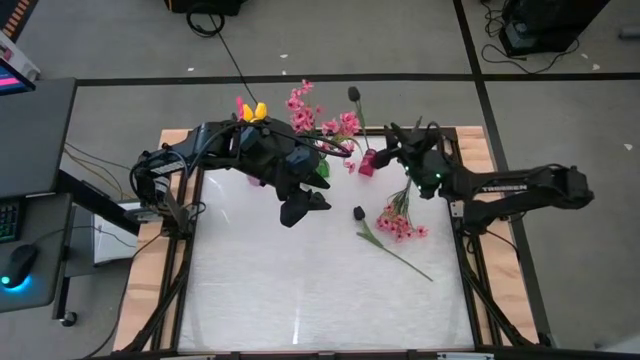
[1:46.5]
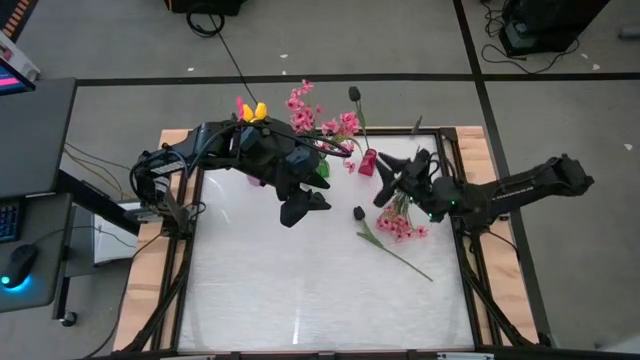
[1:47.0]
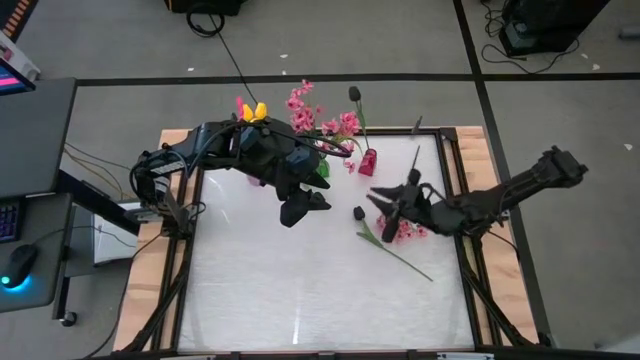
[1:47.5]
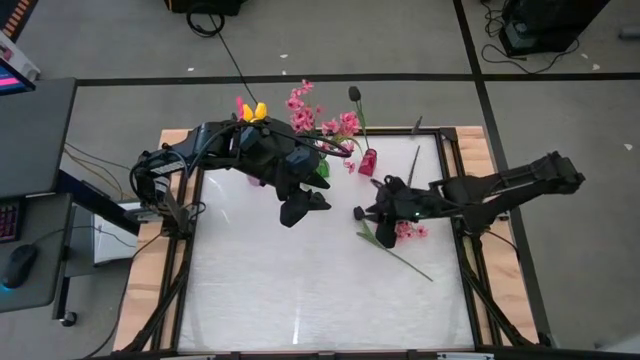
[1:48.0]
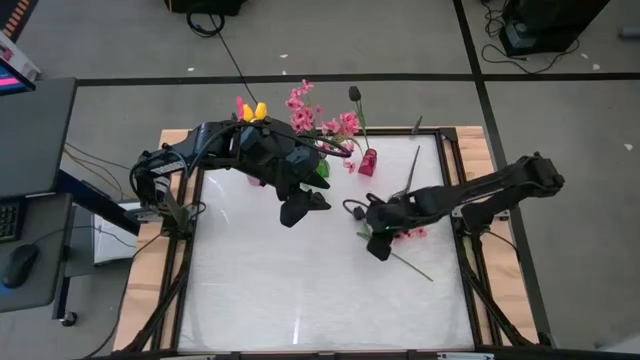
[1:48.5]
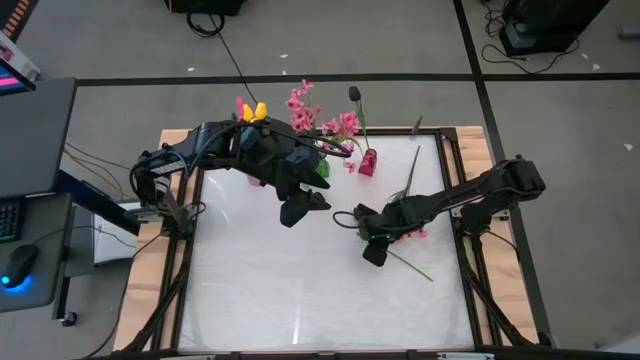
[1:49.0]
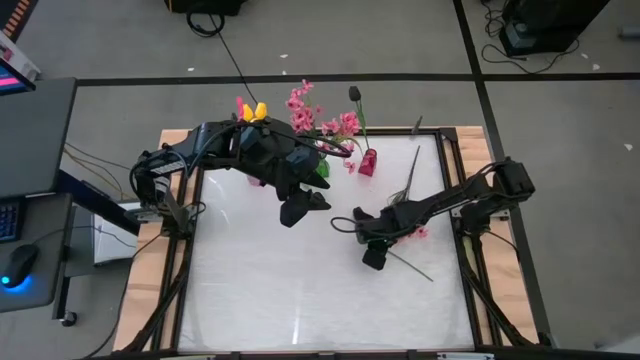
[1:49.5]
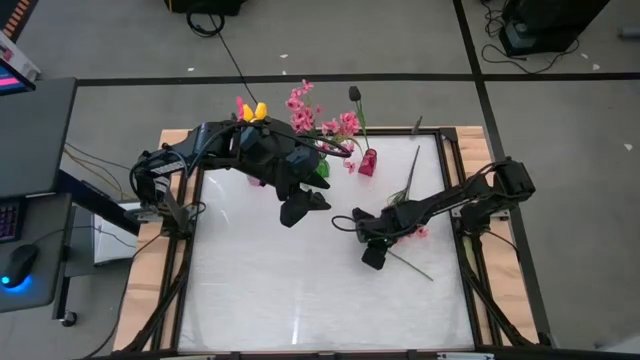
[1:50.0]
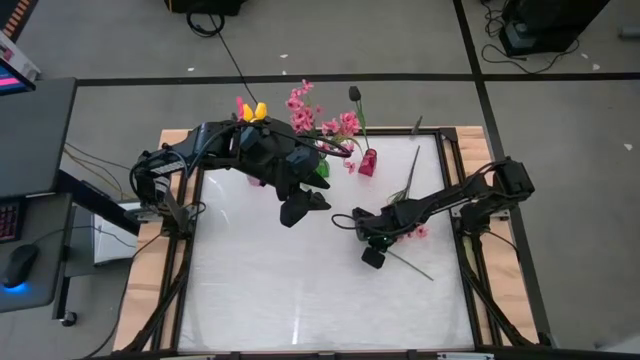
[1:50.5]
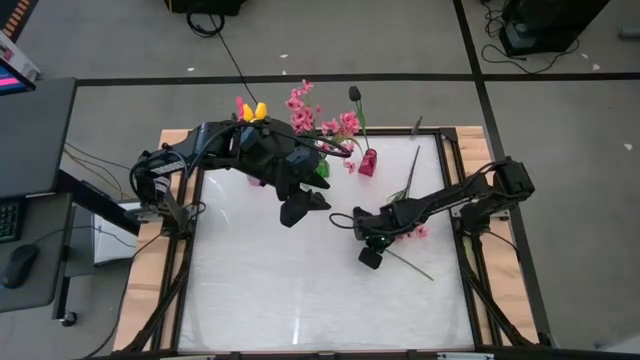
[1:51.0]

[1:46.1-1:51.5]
Task: Sort flowers into vase by color
Put the middle black flower into the red vase

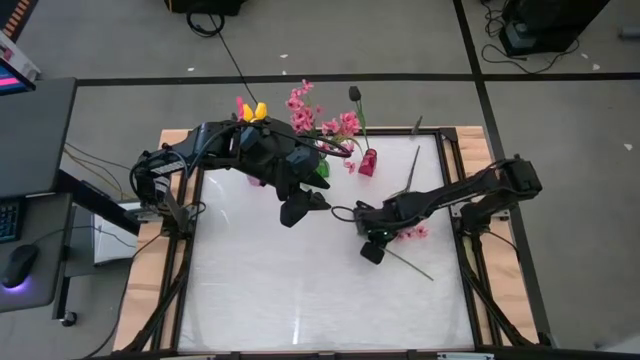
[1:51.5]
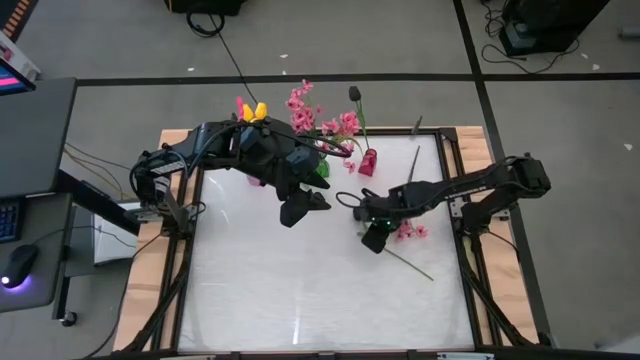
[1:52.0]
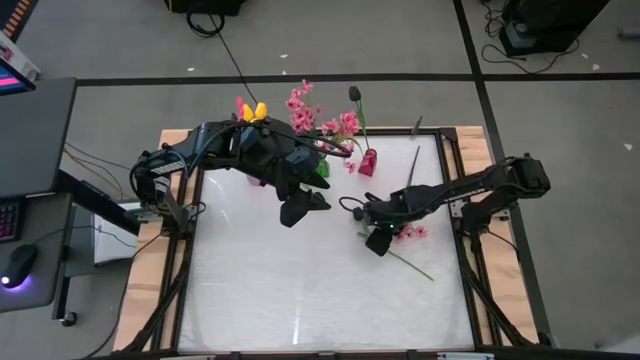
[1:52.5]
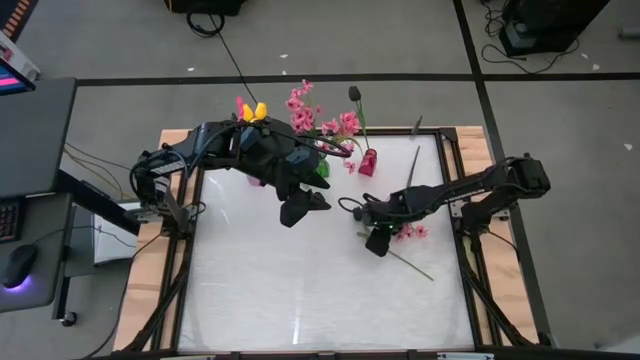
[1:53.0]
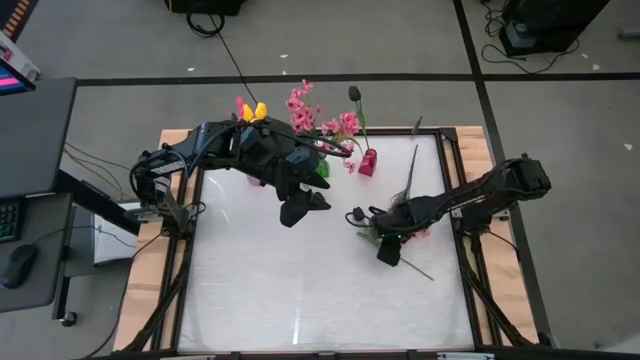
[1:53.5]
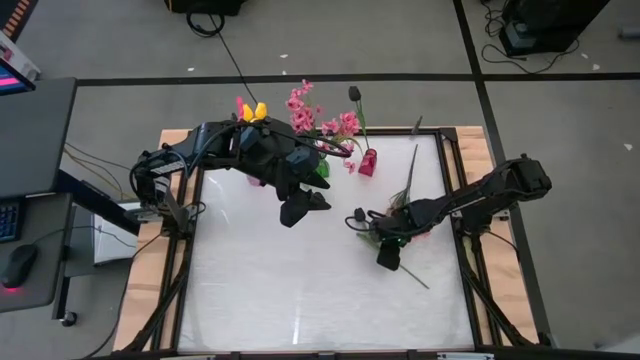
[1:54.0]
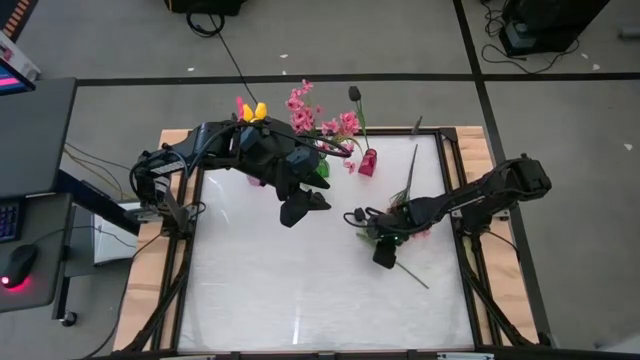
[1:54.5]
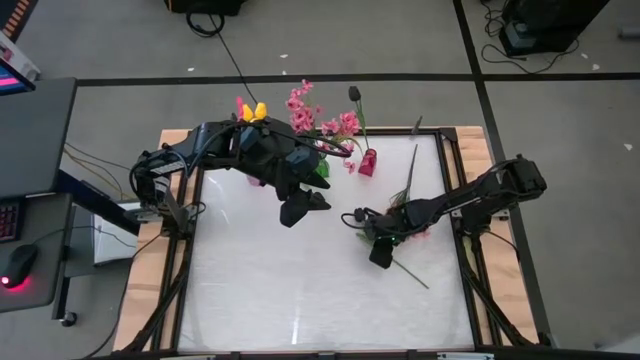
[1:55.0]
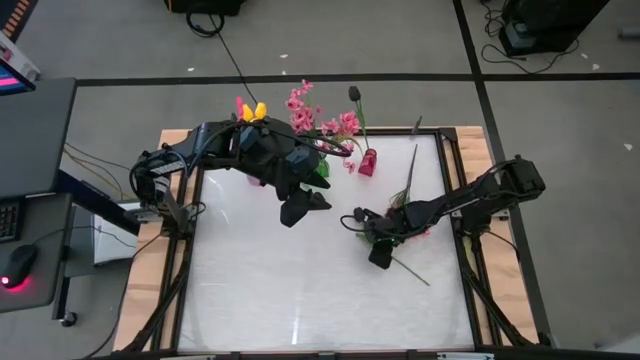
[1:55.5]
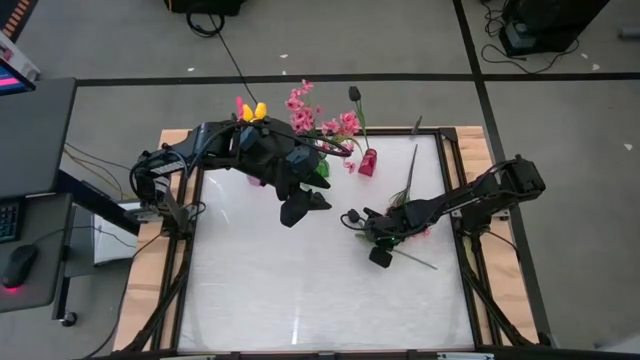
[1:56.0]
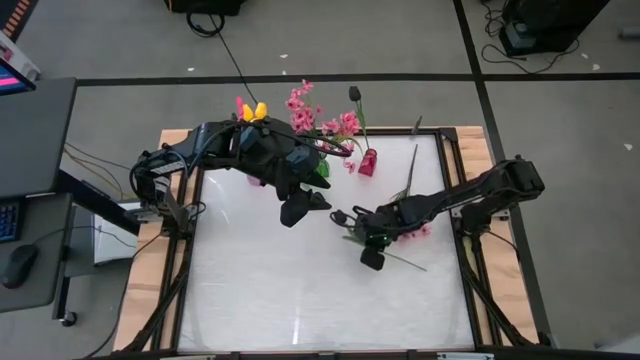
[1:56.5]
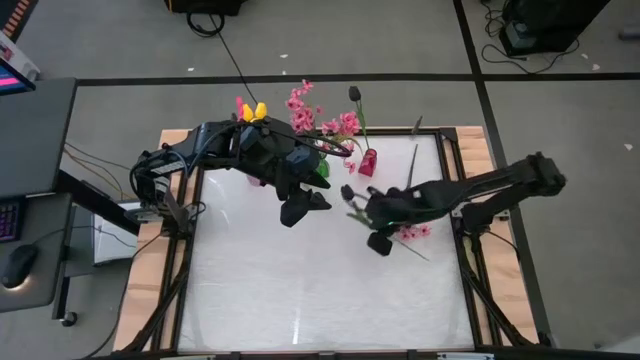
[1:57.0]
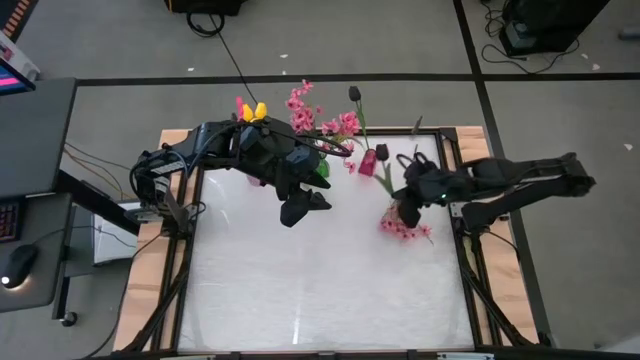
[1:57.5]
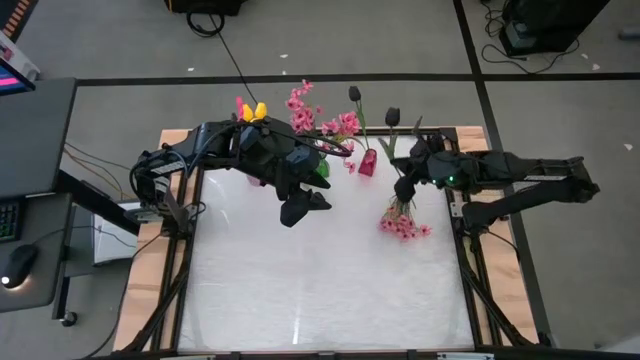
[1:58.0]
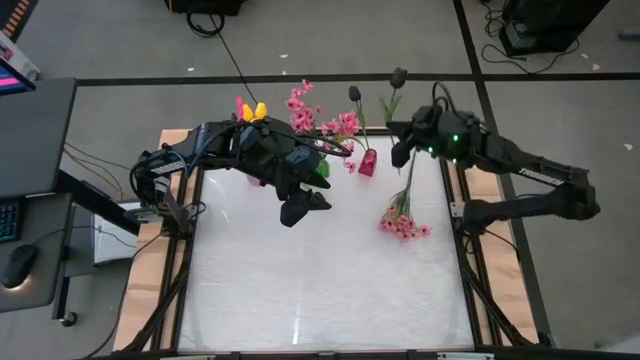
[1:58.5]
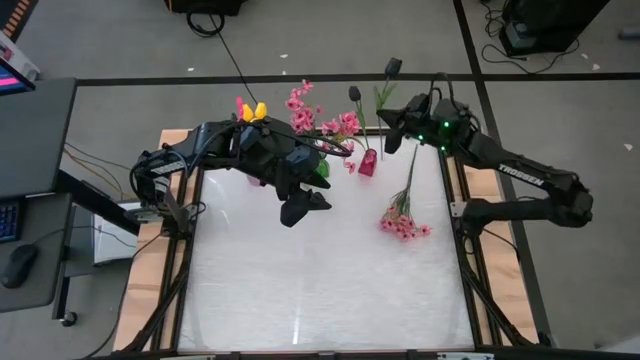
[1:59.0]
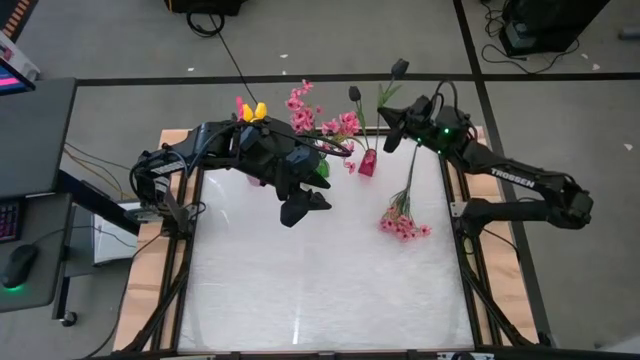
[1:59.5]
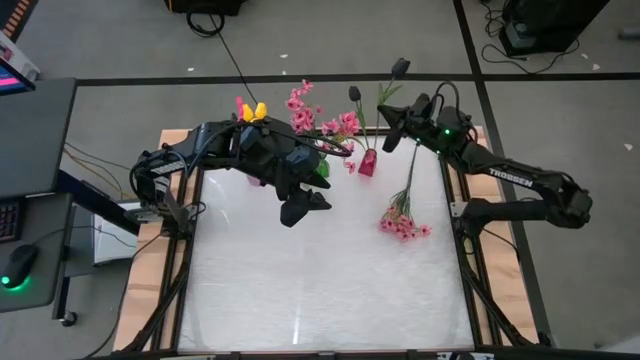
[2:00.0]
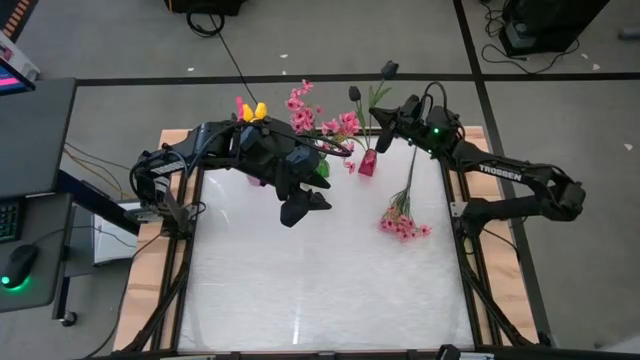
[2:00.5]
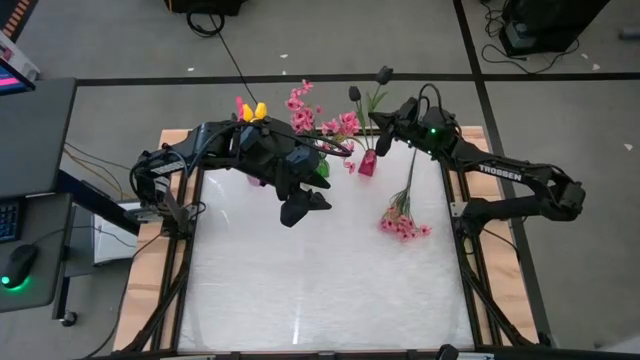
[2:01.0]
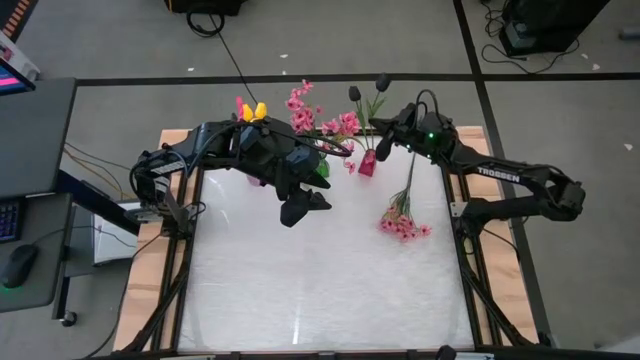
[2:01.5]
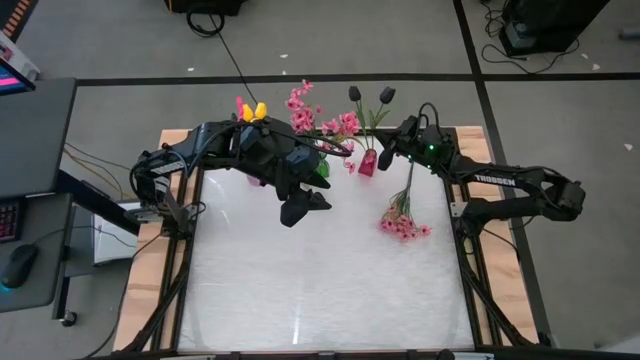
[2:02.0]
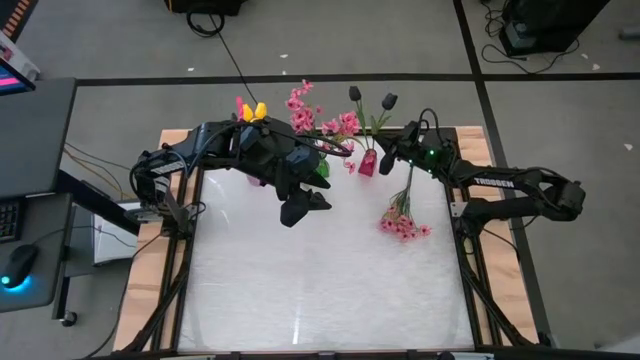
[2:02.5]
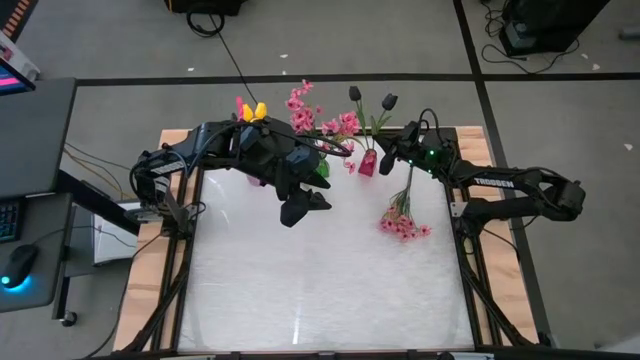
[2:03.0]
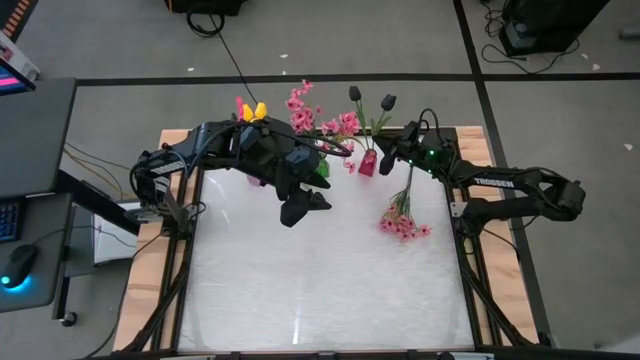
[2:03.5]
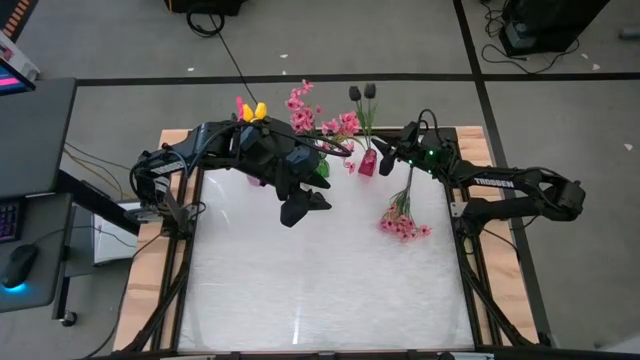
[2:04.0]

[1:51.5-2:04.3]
Put the right black flower into the red vase

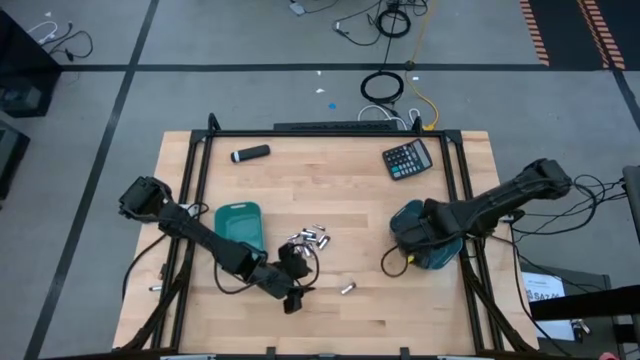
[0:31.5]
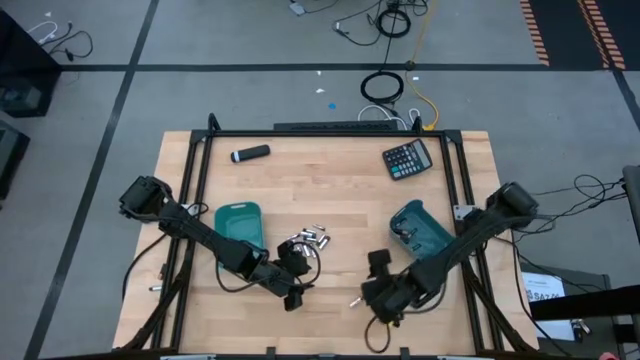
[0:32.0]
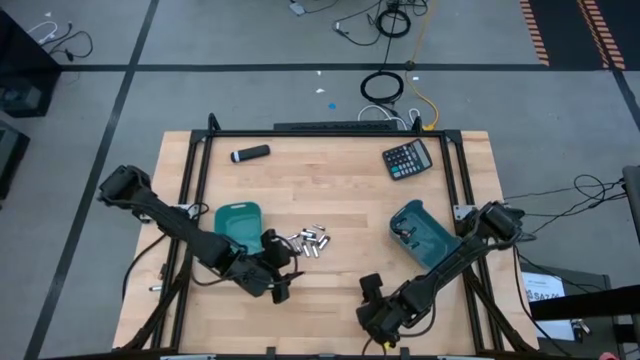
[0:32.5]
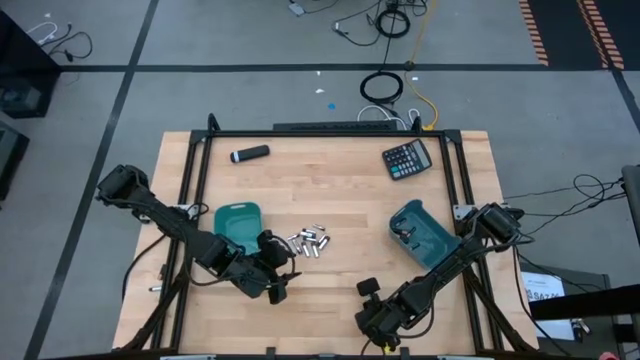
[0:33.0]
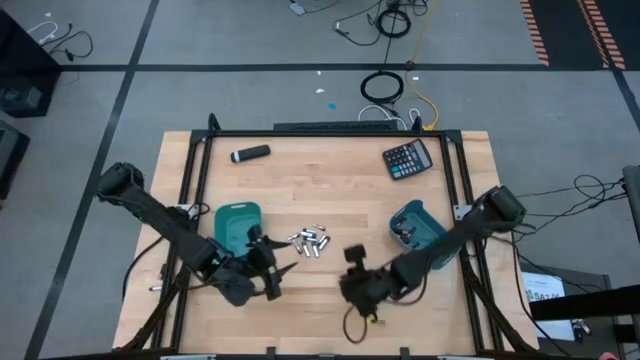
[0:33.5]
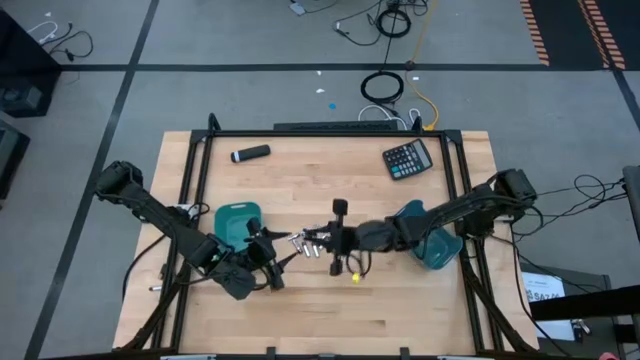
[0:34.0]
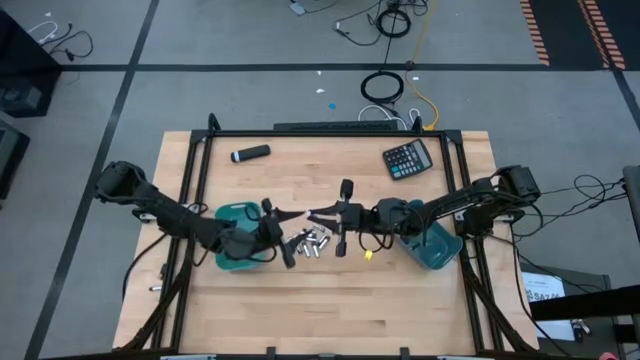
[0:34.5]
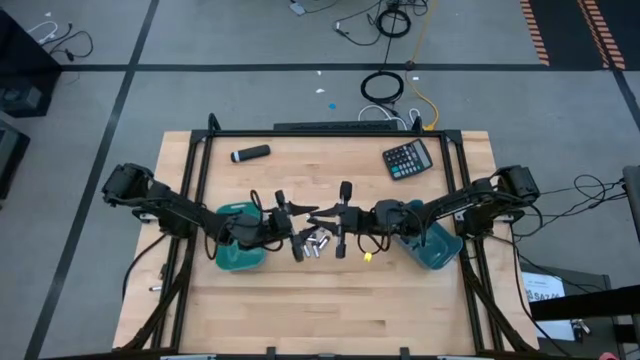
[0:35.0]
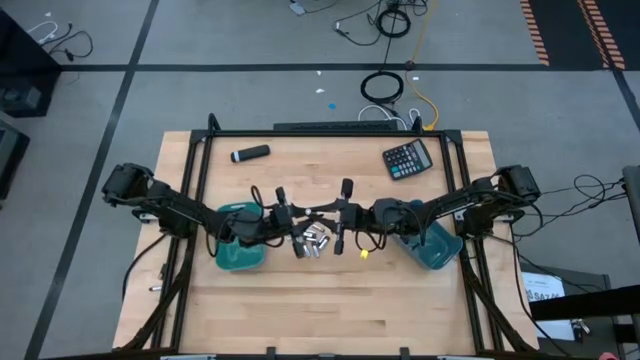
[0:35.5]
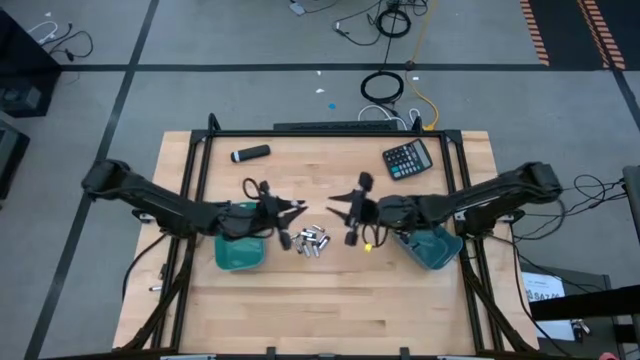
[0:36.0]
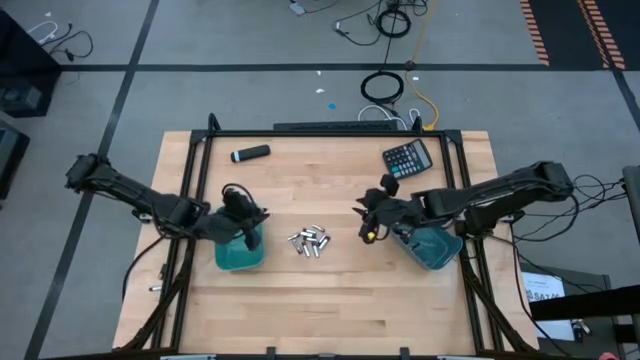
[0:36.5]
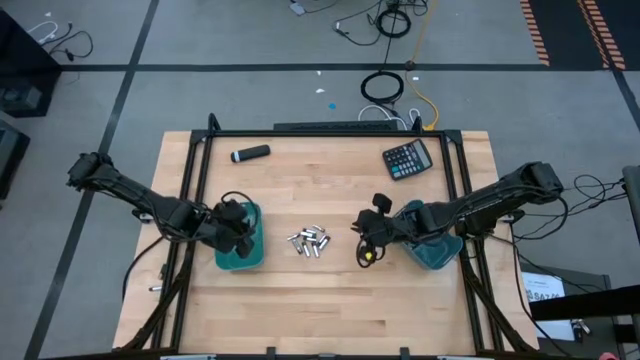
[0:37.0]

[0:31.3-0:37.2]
Task: Sort batteries
Put the silver battery into the light blue bin
